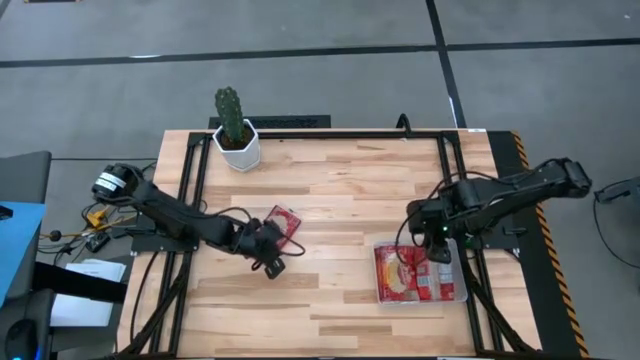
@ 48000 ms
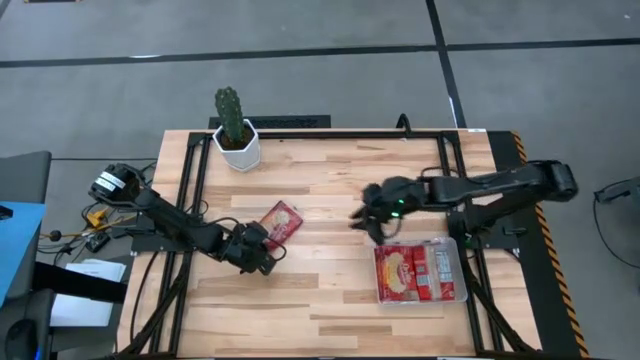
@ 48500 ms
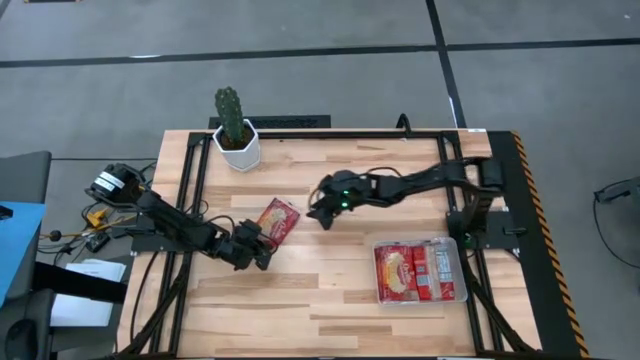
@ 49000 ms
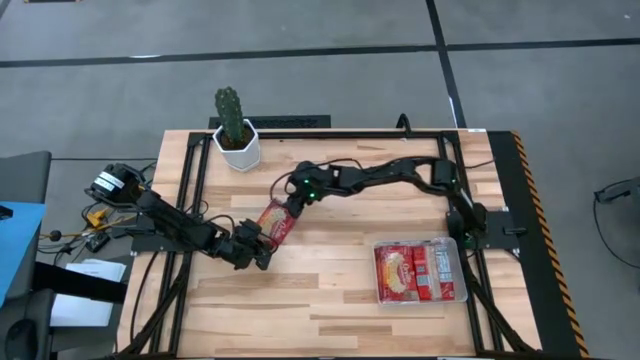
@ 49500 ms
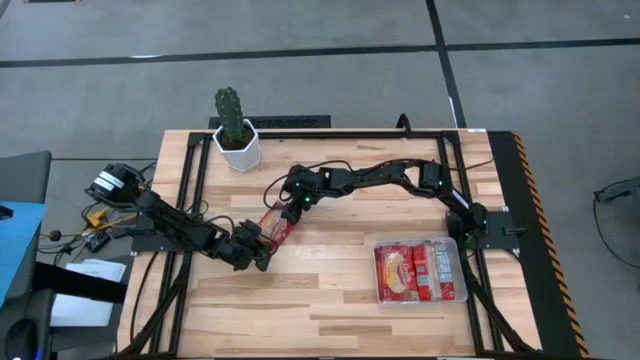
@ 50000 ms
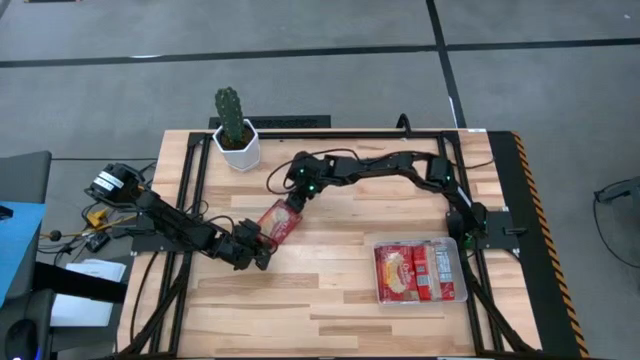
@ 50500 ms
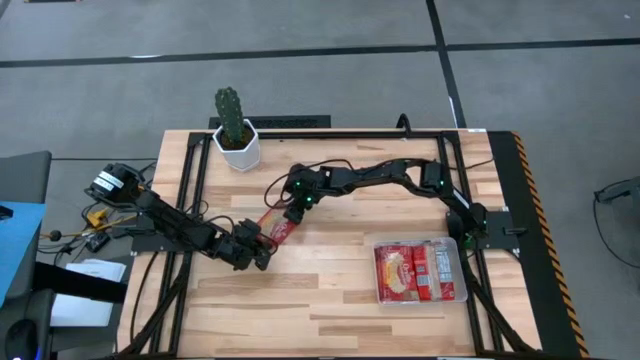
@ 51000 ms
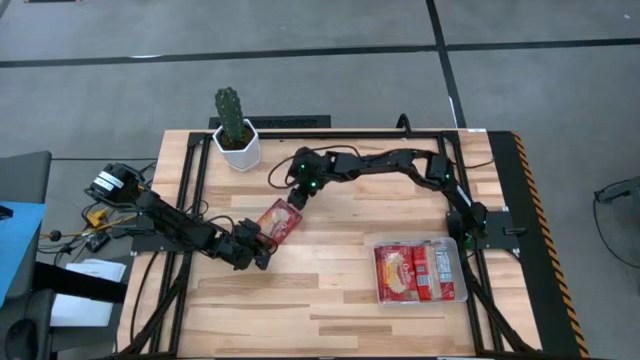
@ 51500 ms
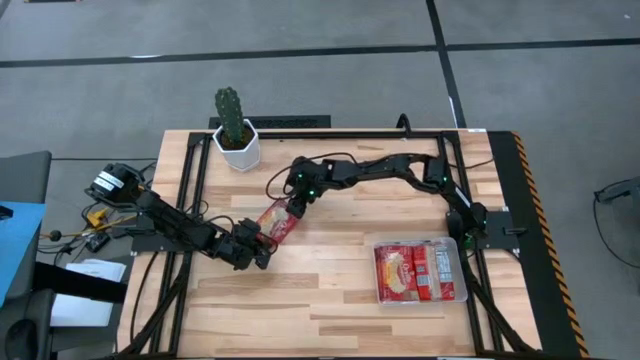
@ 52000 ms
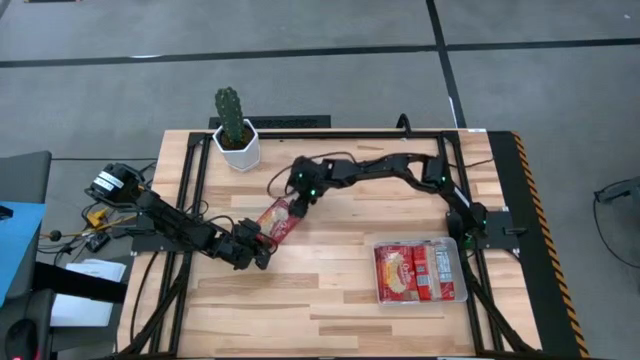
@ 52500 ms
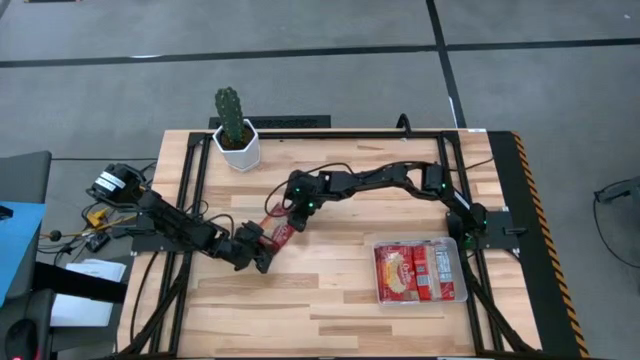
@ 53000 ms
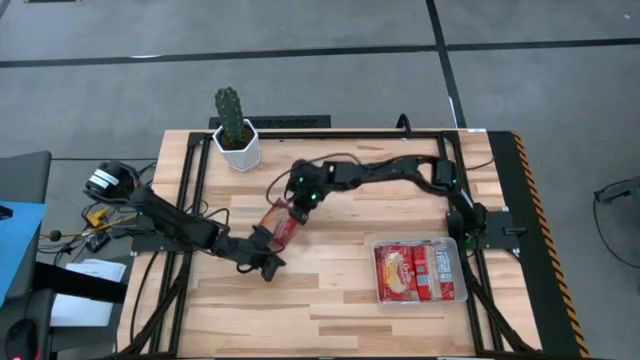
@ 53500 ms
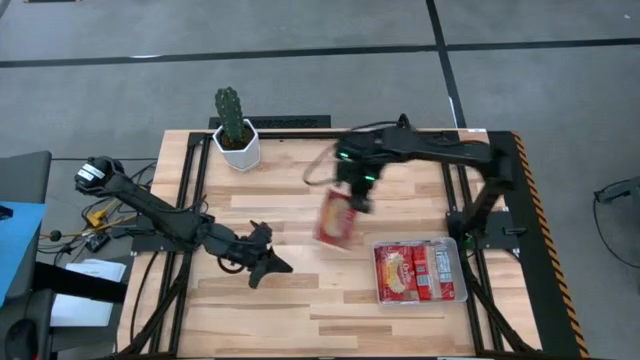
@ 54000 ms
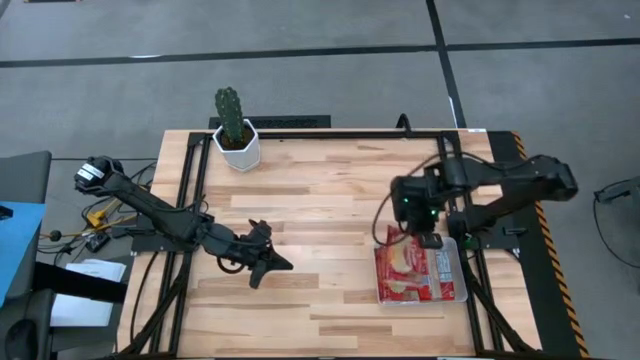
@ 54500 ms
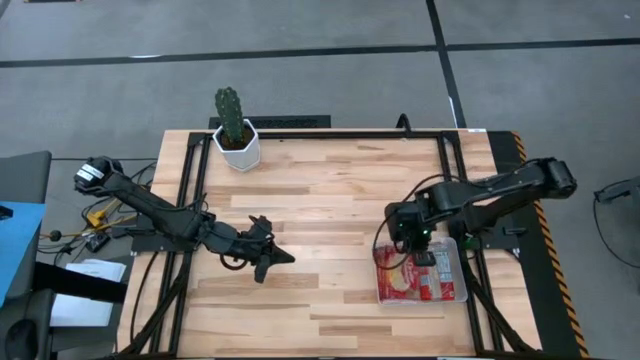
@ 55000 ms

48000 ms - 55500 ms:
Task: Sort popcorn bags into baskets
Put the popcorn bag into the transparent bin

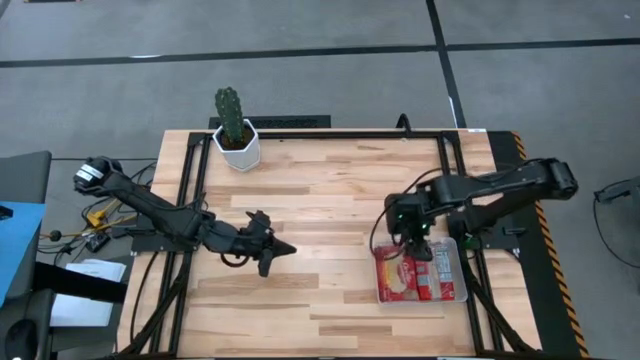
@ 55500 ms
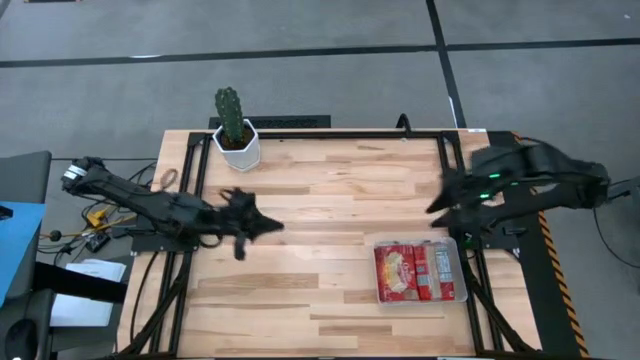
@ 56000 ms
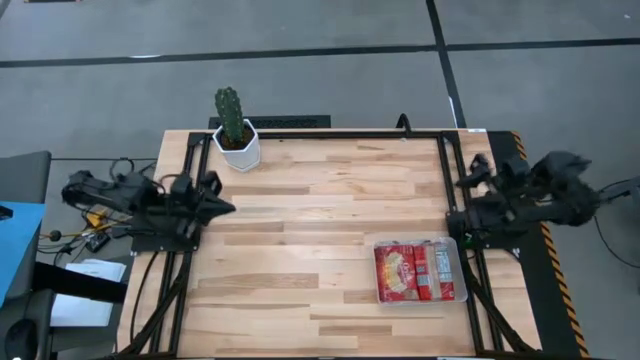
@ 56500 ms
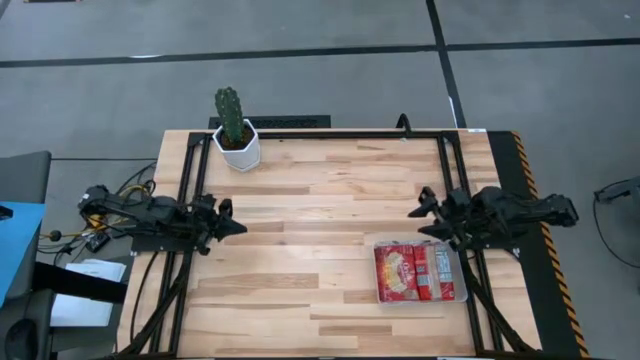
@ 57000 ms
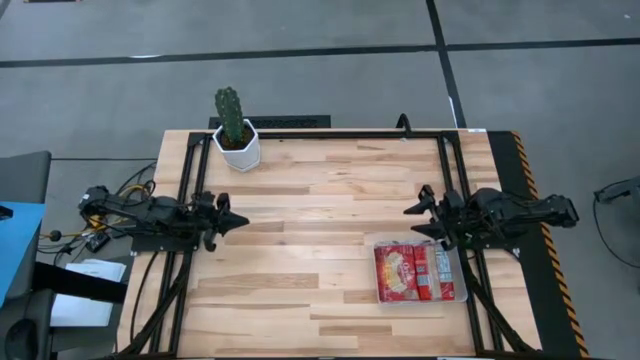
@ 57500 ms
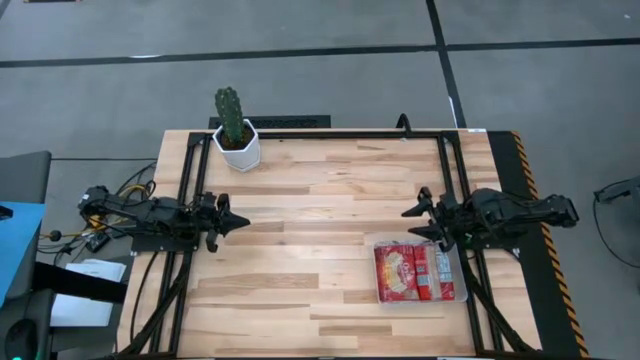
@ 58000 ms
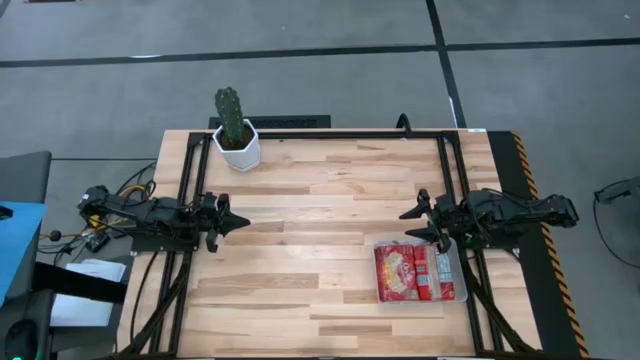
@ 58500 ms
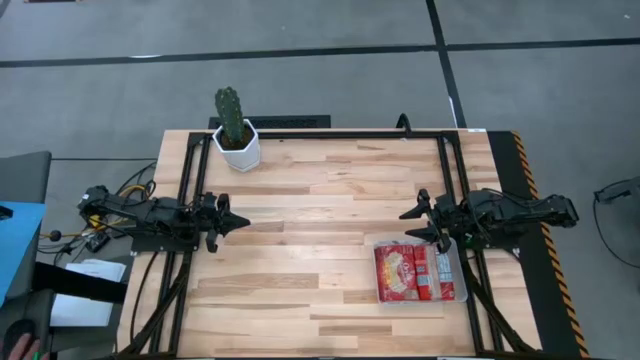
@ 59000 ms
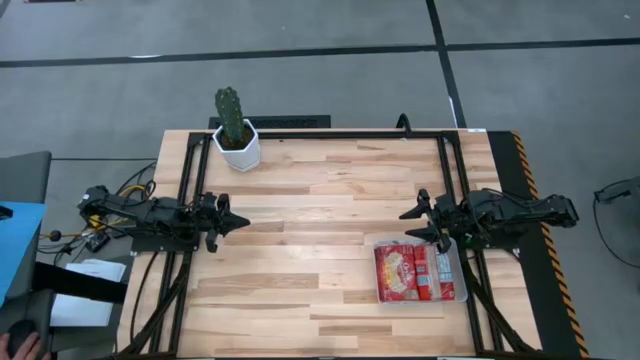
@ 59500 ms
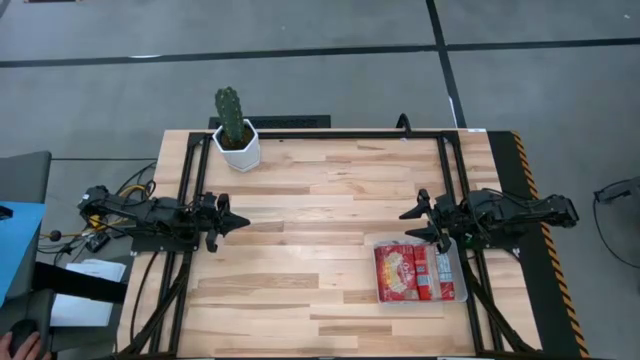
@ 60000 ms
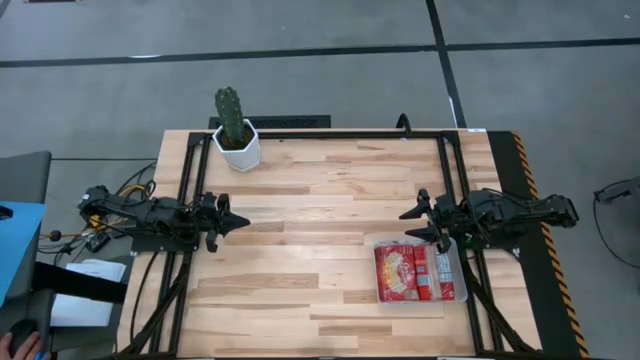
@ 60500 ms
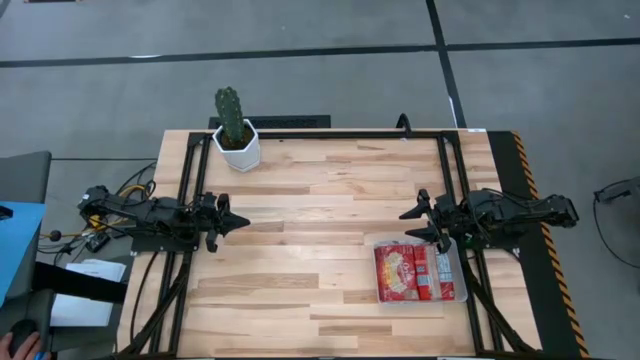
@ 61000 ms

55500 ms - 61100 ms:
Return to Home Position

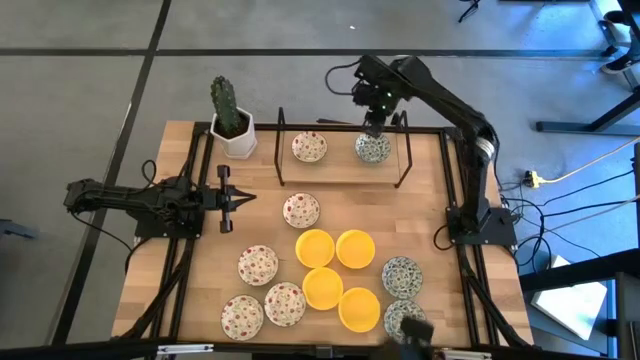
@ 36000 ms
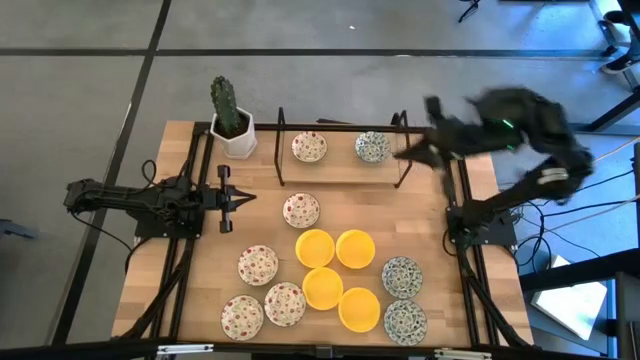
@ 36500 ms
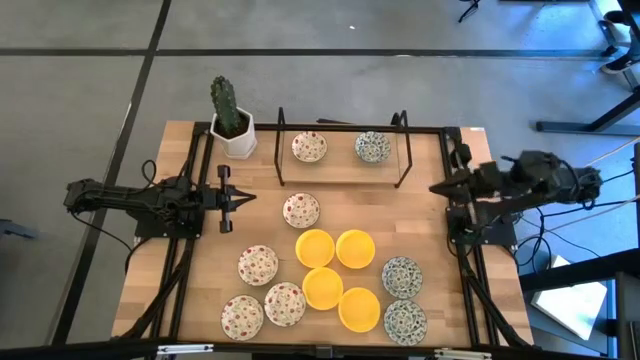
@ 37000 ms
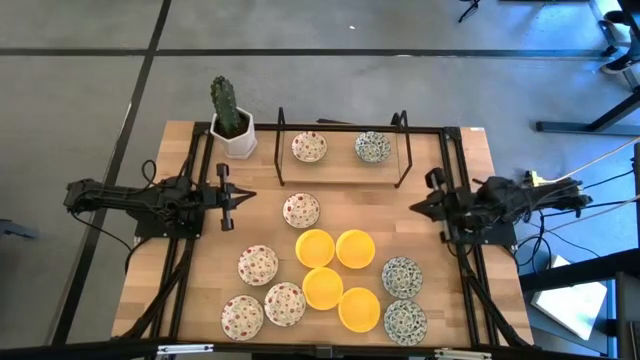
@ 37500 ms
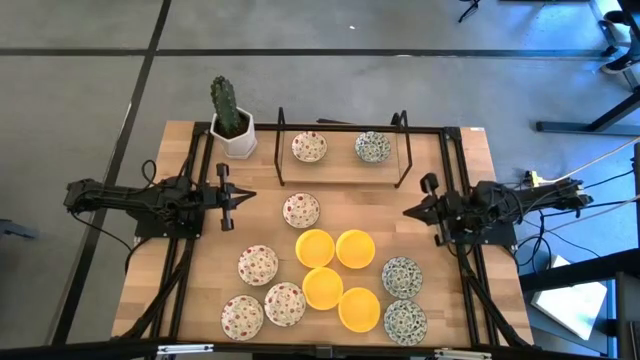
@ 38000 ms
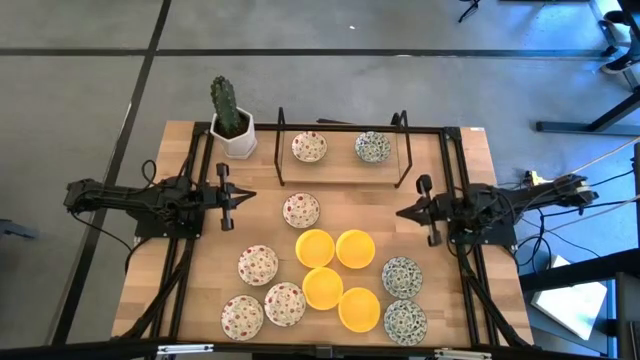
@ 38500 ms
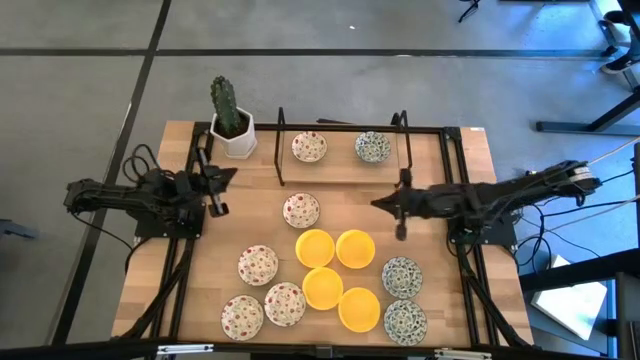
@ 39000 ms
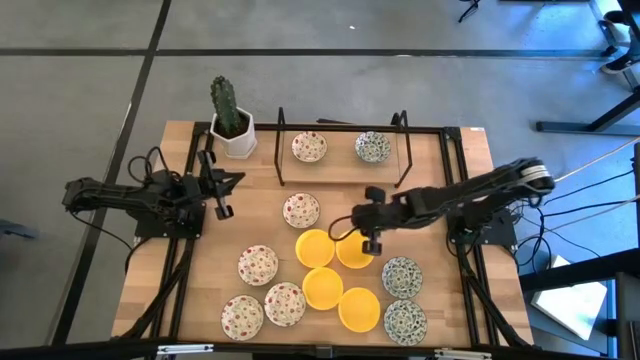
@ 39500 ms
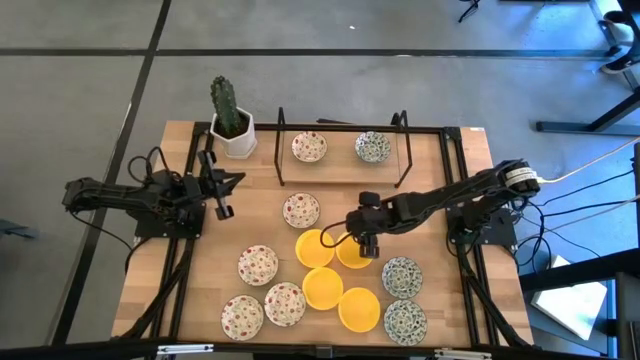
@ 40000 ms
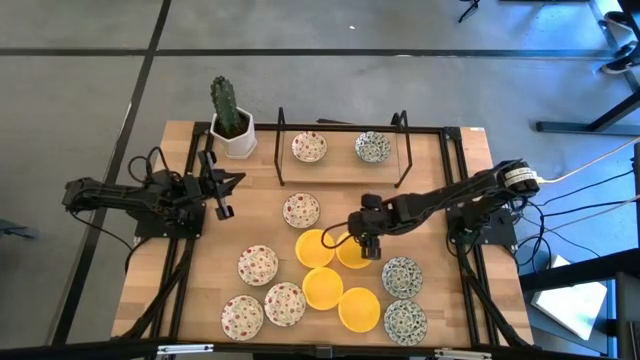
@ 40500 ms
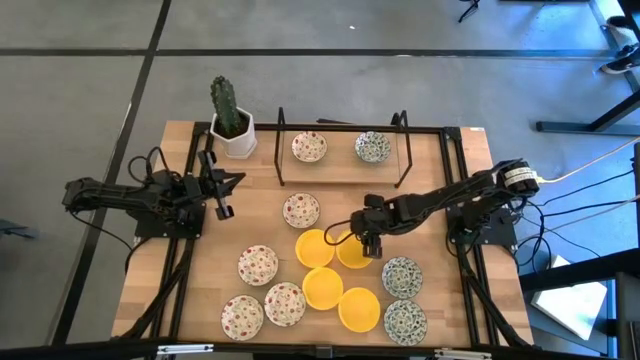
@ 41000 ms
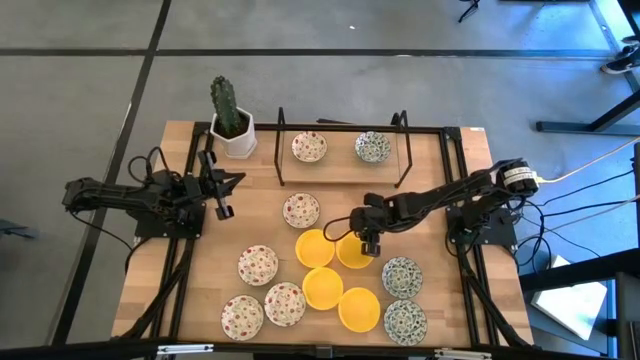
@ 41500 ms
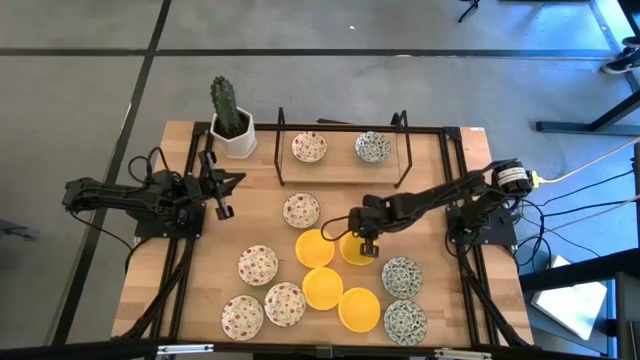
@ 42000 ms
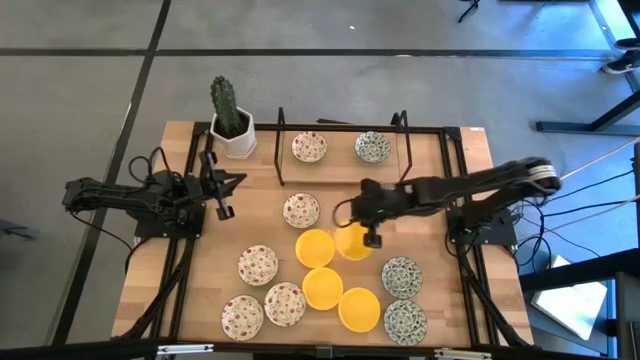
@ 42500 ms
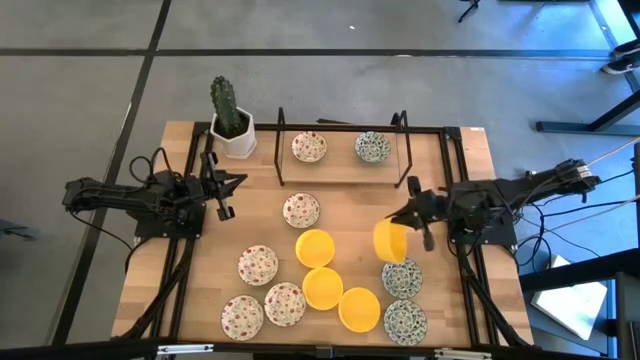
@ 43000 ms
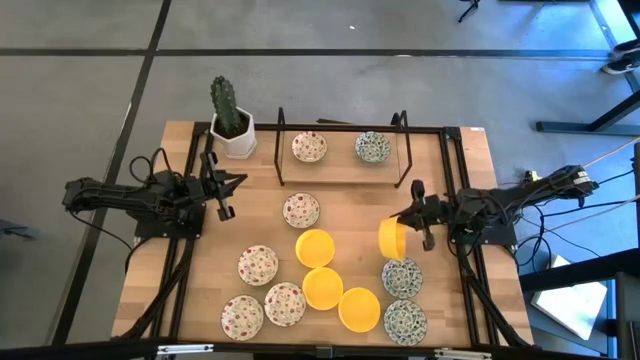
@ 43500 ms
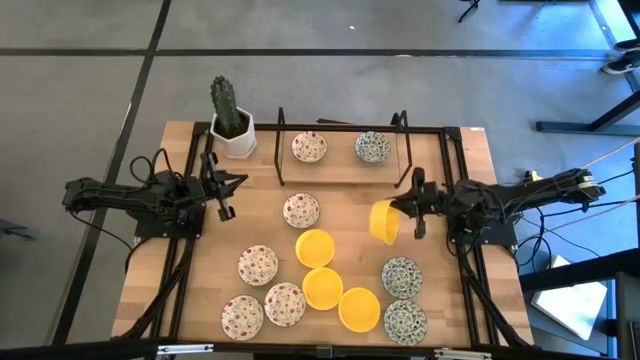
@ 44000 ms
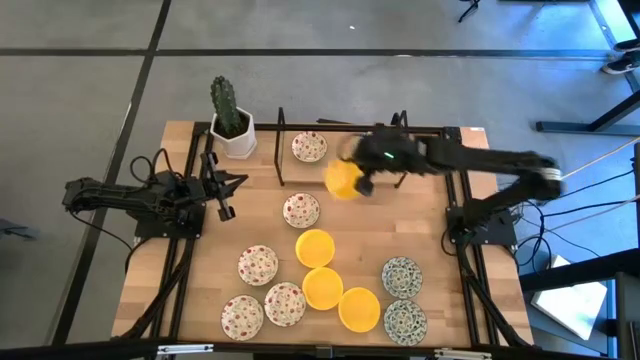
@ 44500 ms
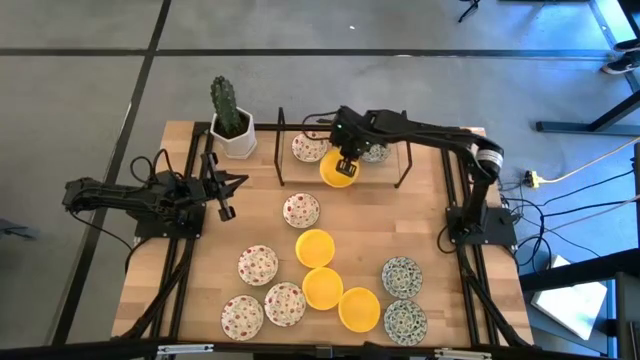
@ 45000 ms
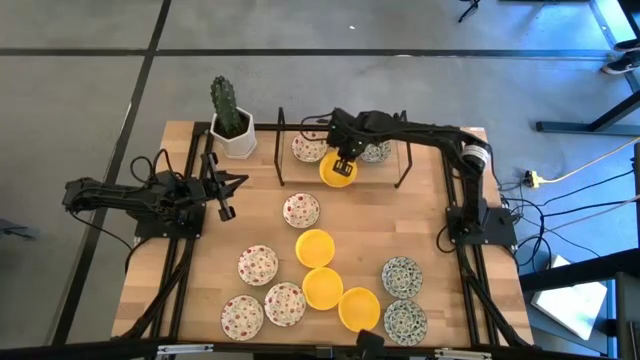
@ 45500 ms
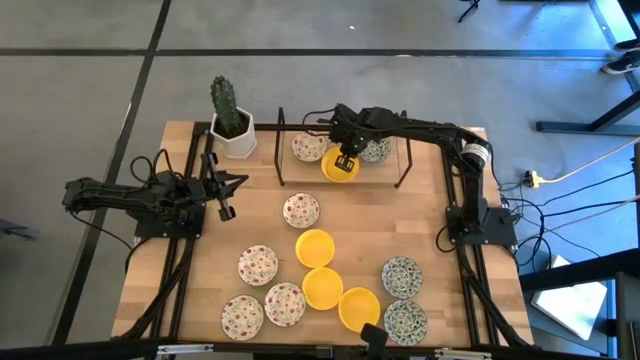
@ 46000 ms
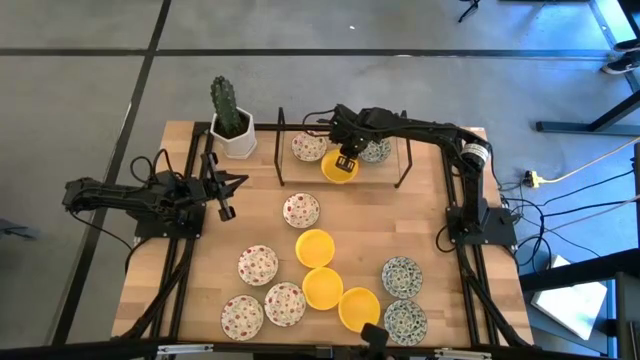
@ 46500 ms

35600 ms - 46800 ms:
Task: Pick & Place Mini bowls
Put the yellow bowl on the shelf
